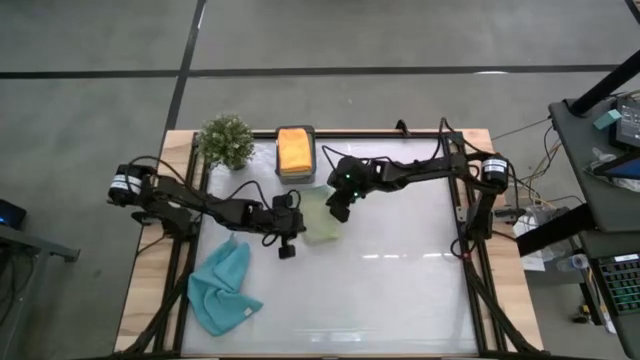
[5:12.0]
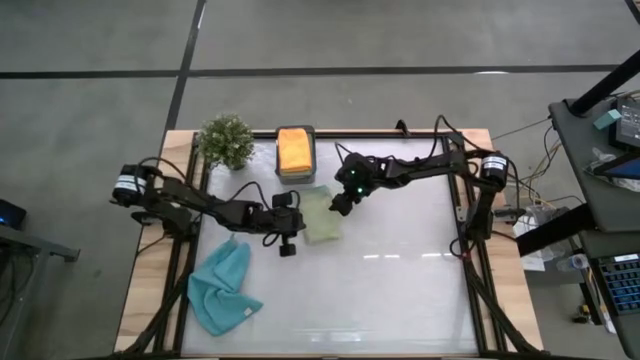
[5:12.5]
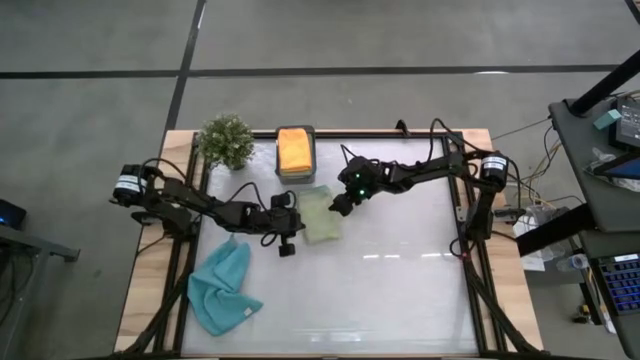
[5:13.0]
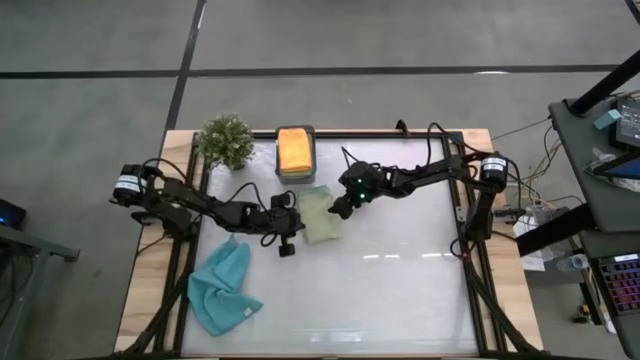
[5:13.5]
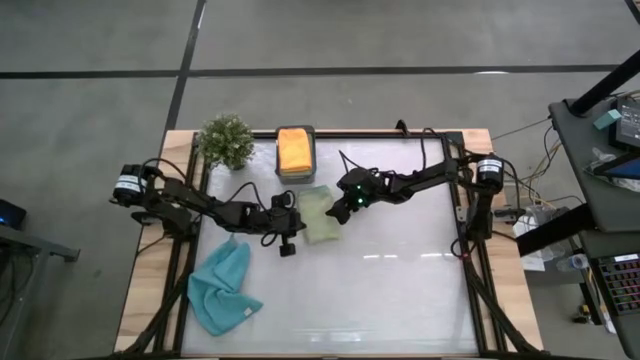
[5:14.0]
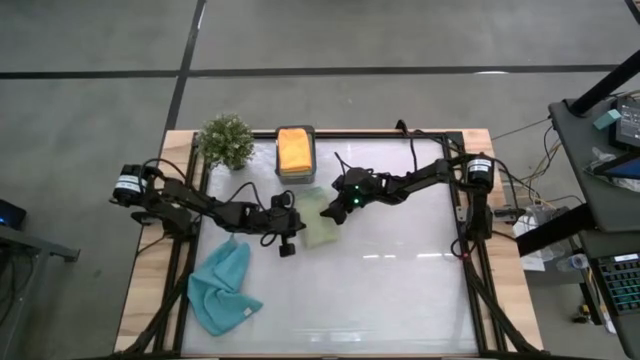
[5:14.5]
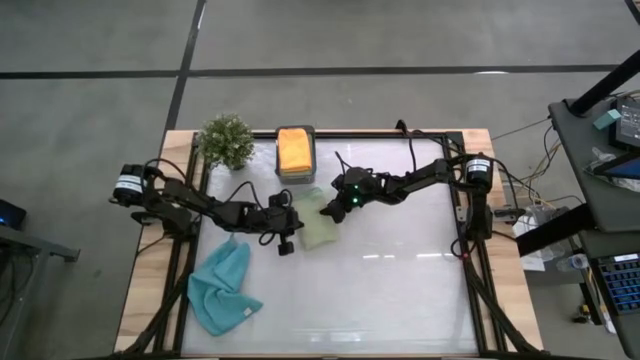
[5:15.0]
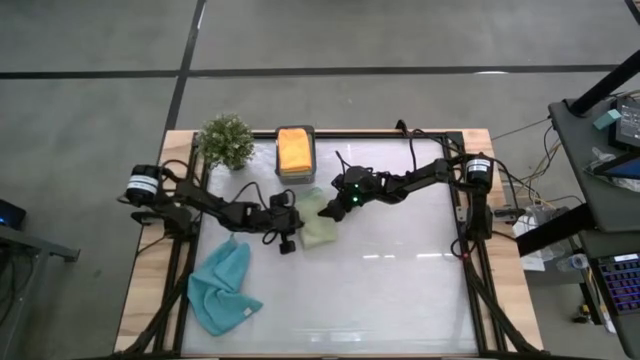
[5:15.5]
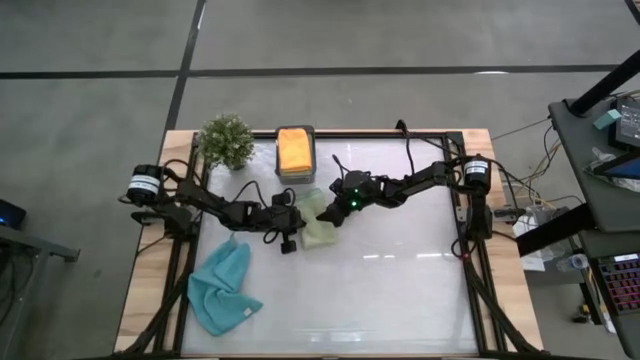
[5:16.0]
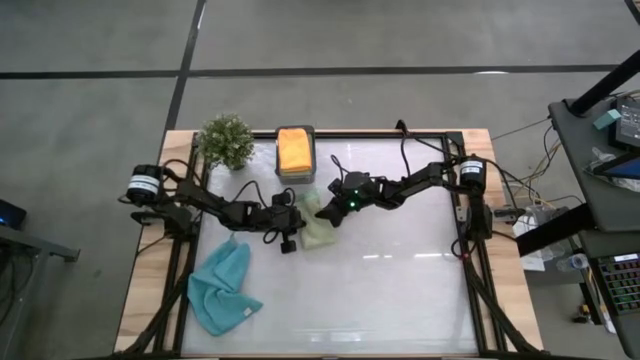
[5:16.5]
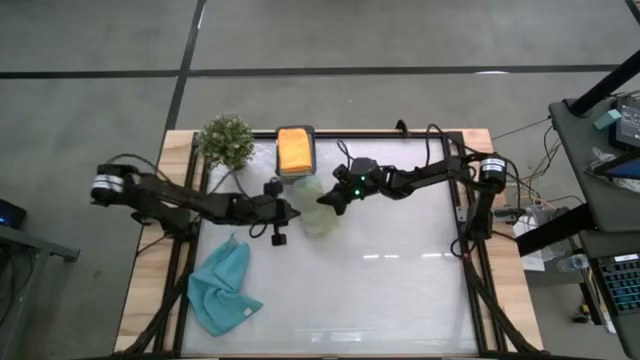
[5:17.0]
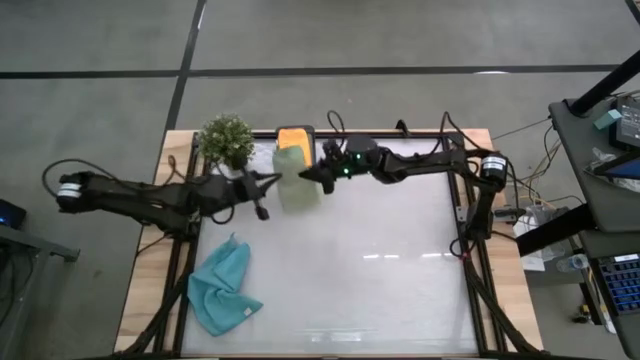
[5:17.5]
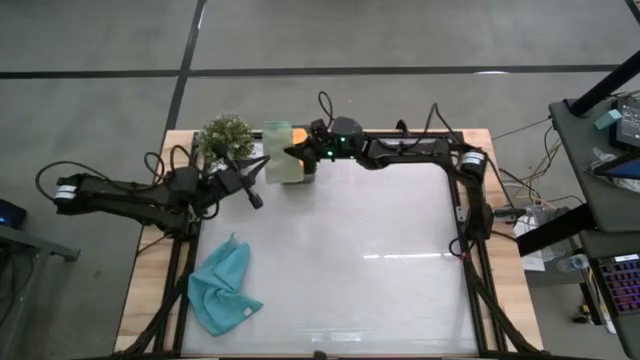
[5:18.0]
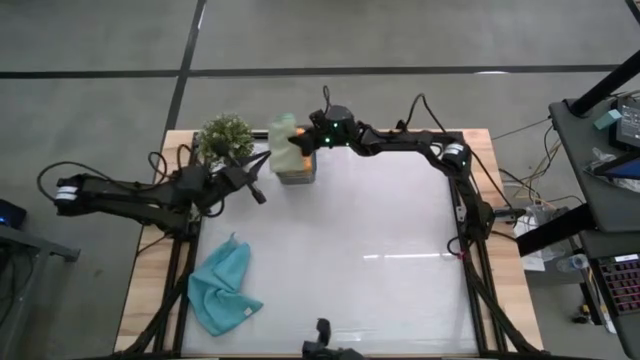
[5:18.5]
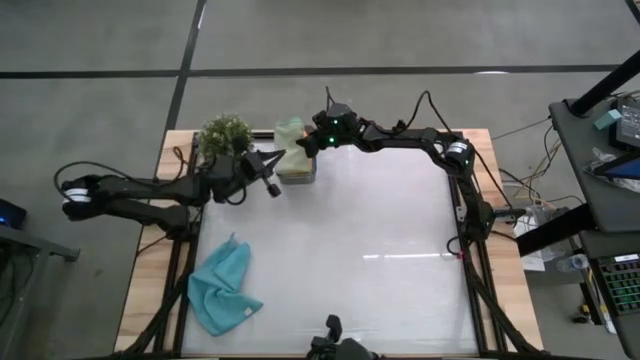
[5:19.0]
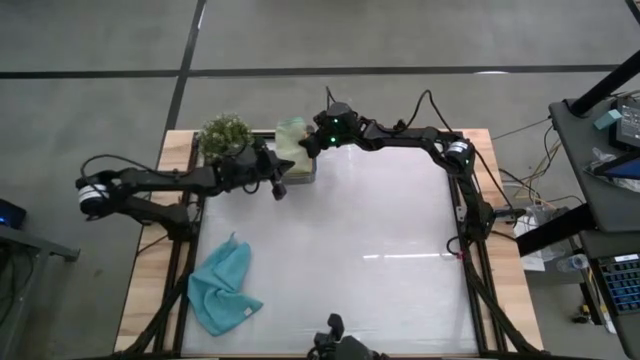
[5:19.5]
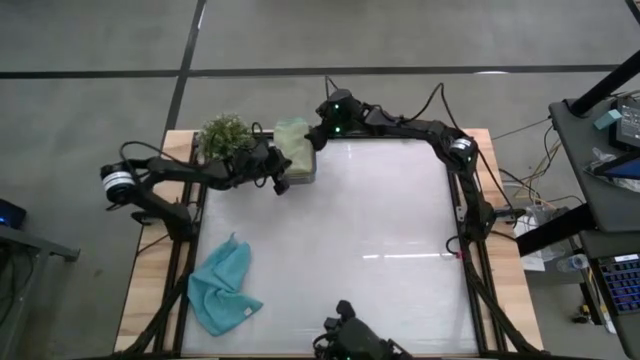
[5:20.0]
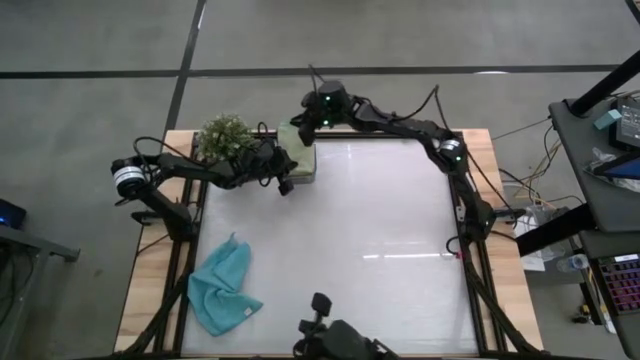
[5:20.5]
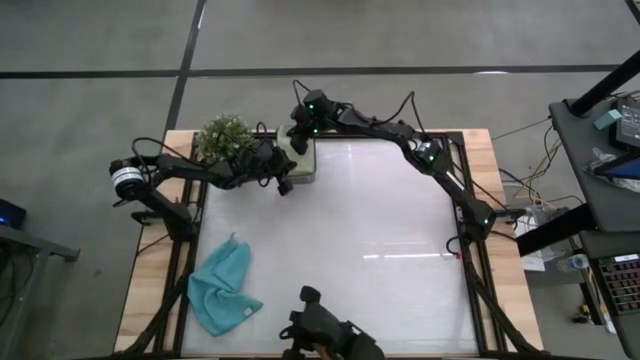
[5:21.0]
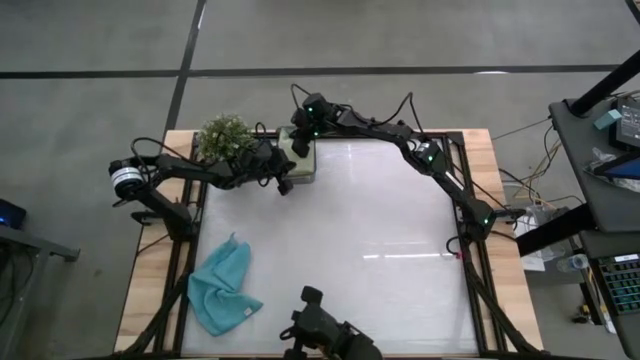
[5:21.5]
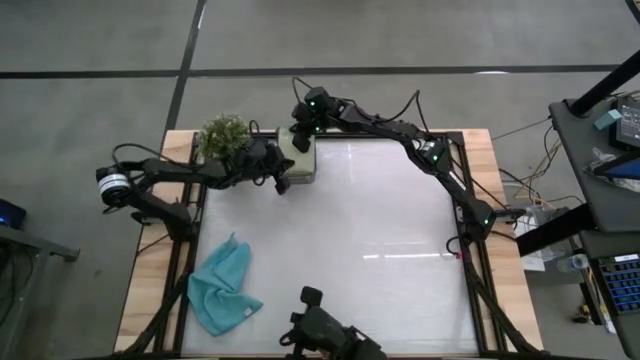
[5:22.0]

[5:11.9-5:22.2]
Task: Fold microfiber towels
Put the green folded towel into the bin

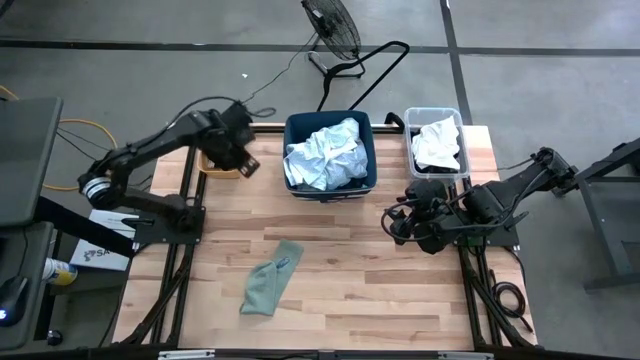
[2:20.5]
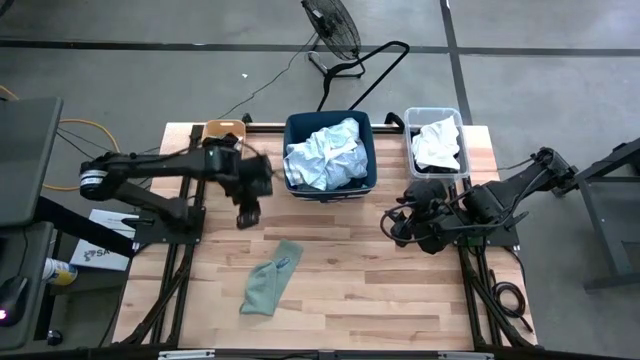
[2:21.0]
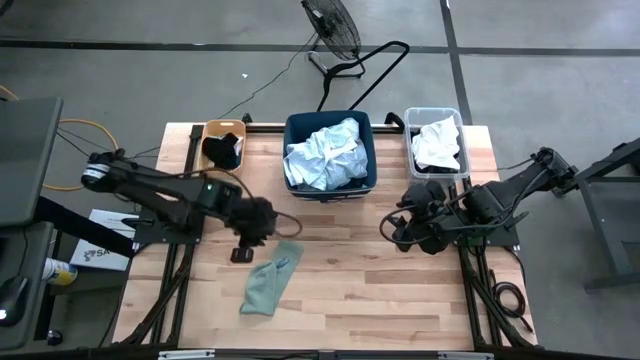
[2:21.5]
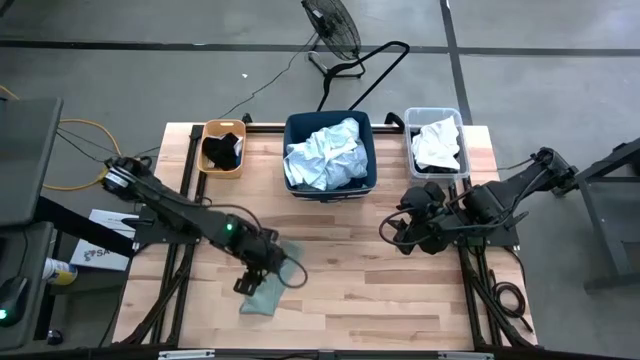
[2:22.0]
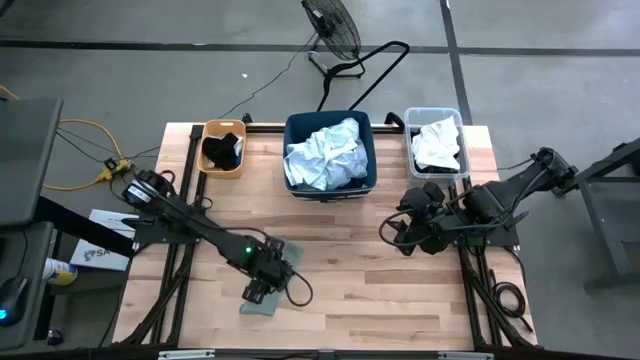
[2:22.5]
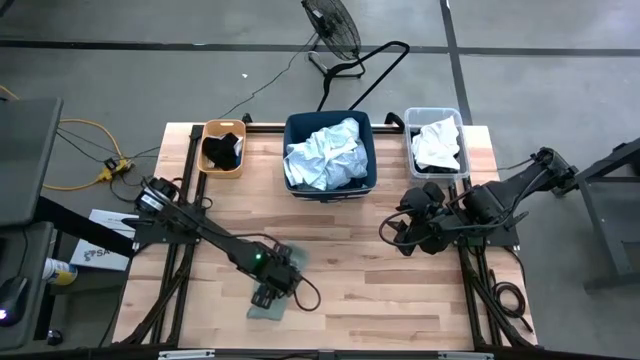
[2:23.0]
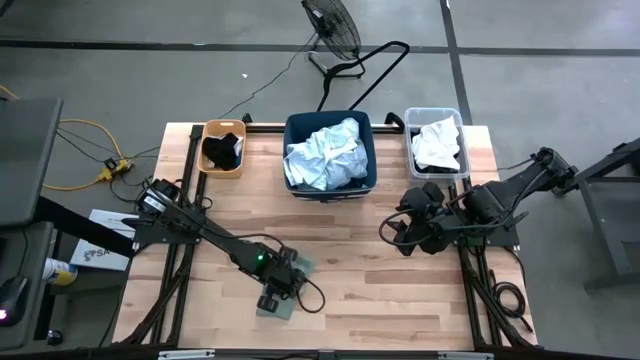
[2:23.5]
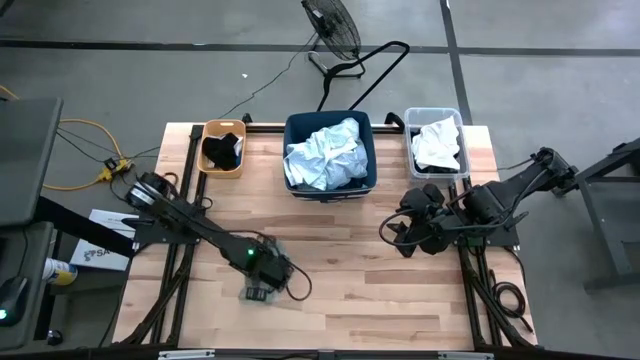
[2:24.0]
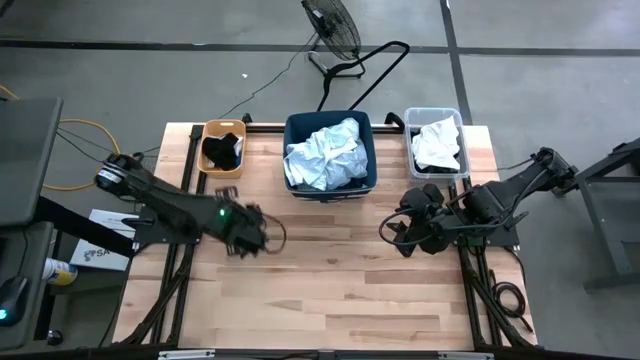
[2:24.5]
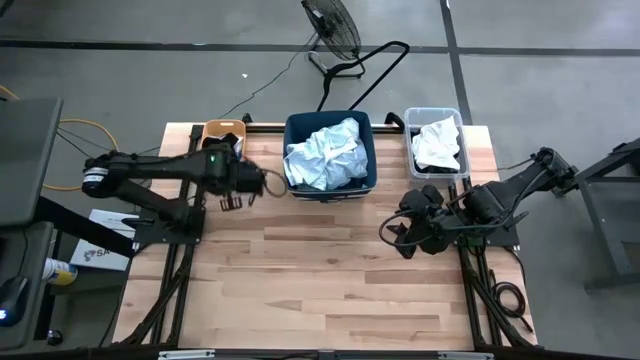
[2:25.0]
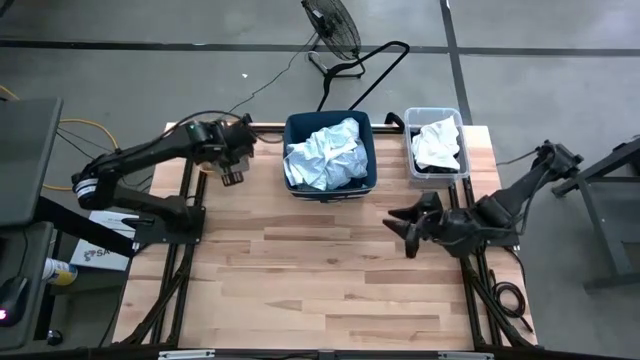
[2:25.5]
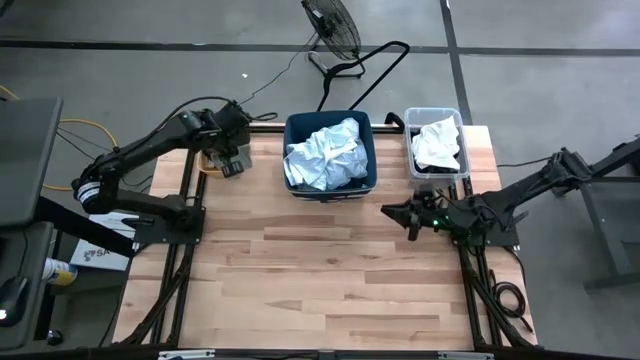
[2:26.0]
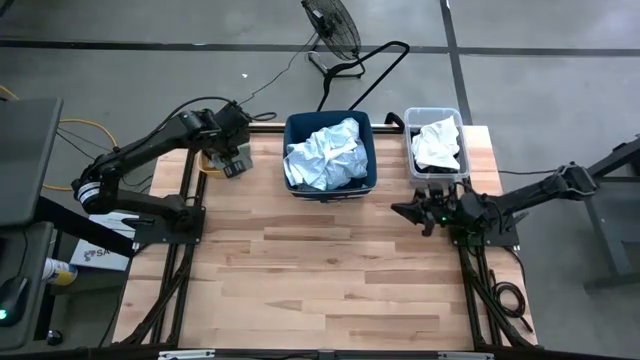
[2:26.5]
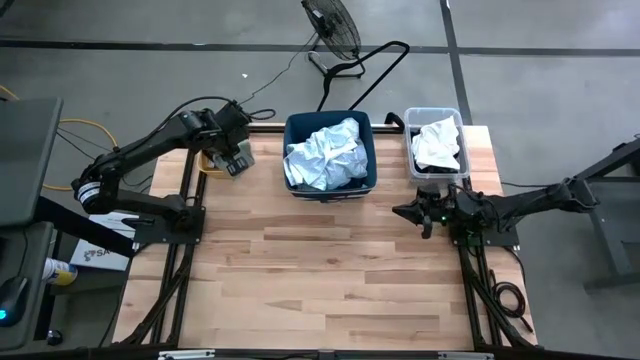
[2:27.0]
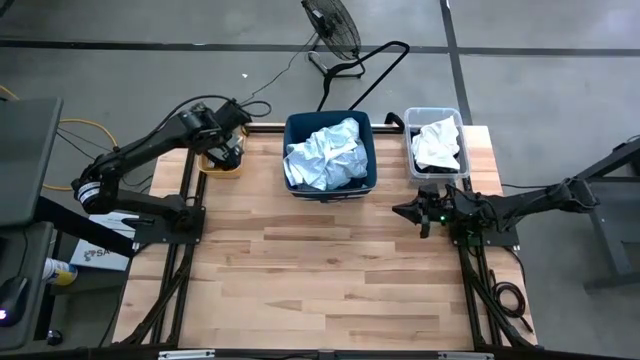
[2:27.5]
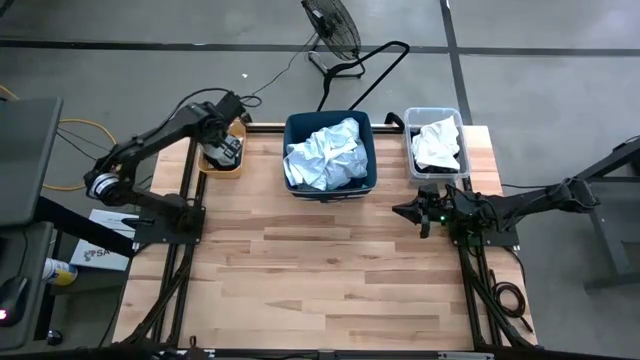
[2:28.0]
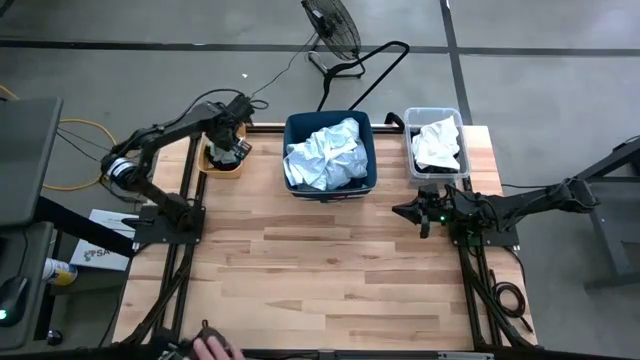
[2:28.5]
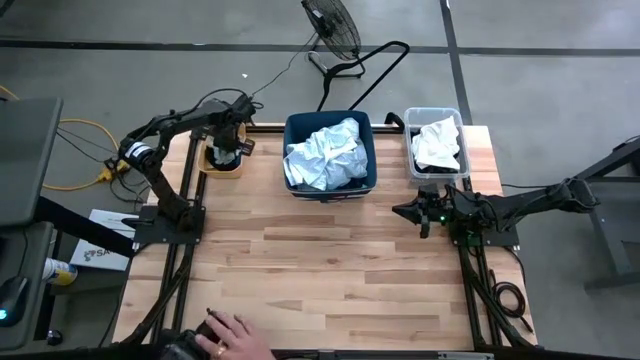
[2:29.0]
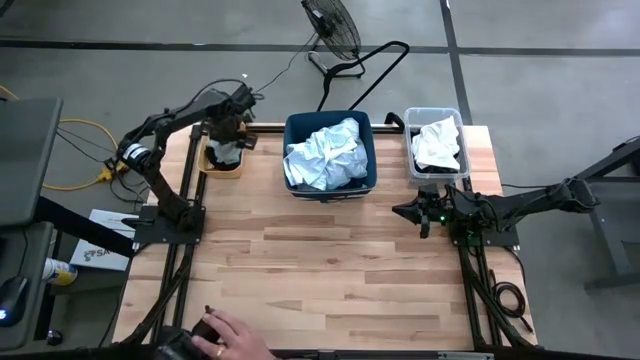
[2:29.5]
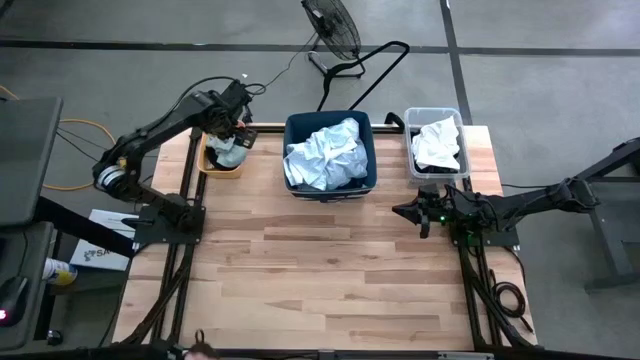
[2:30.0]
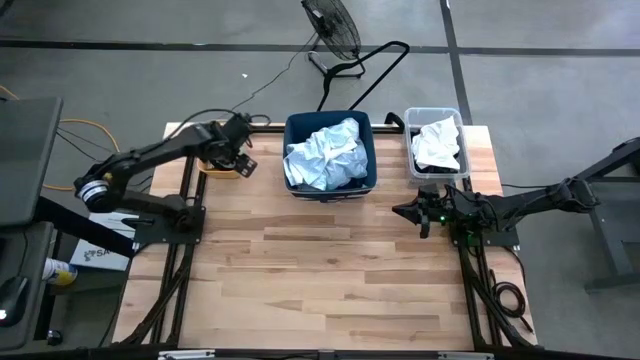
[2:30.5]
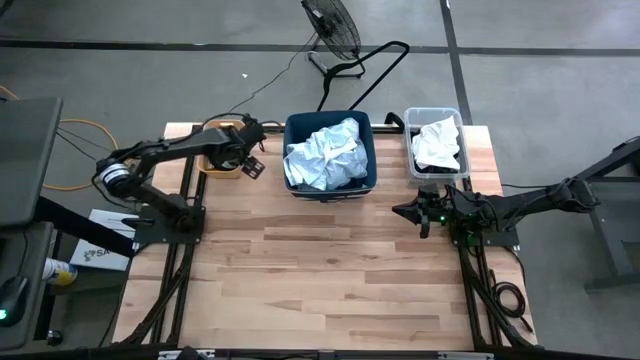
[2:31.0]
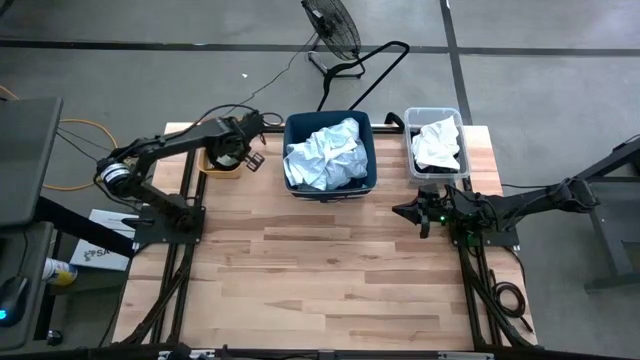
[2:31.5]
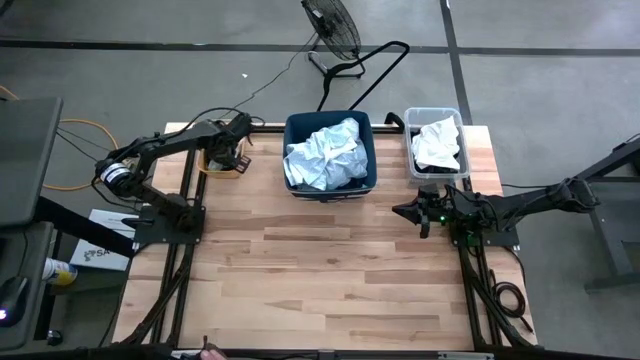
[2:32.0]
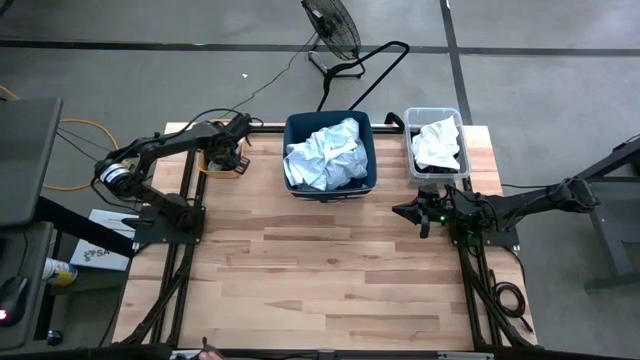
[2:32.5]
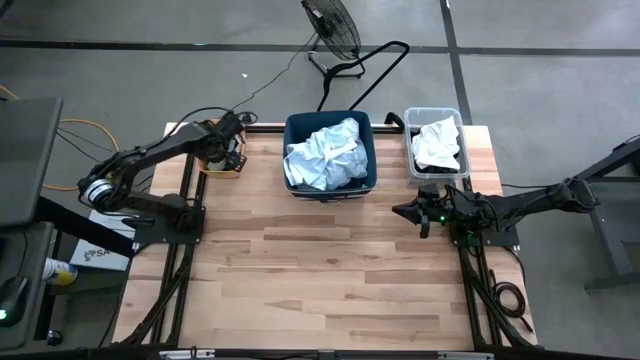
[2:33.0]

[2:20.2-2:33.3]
Task: Pick & Place Cloths
Put the gray sock into the yellow bin
